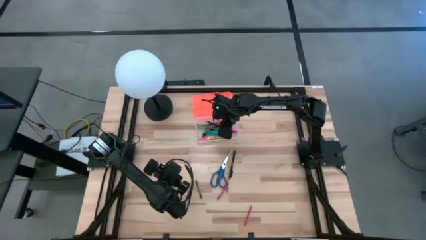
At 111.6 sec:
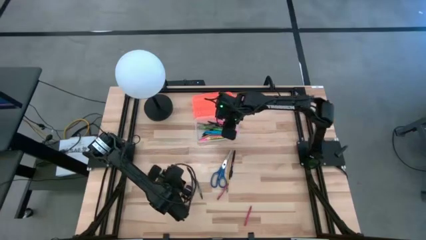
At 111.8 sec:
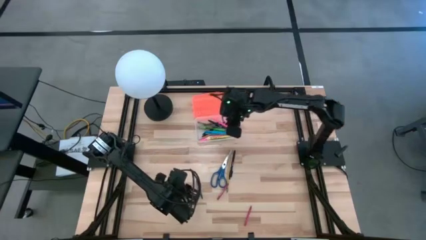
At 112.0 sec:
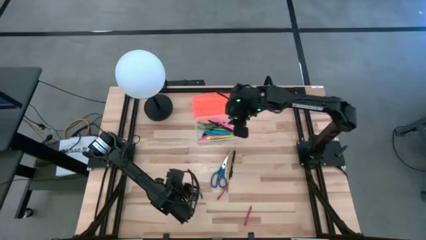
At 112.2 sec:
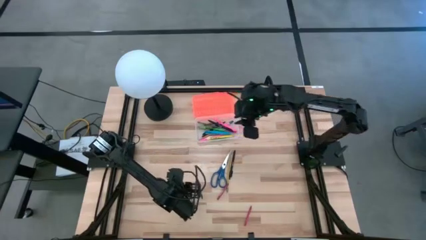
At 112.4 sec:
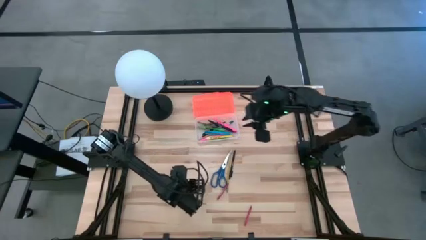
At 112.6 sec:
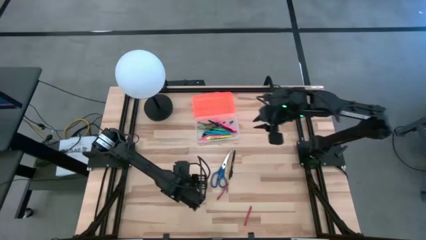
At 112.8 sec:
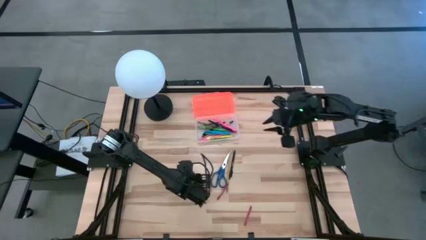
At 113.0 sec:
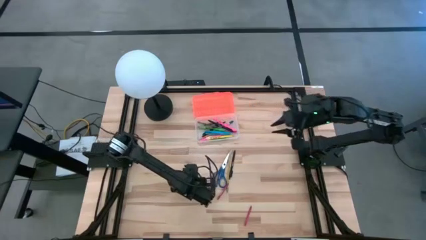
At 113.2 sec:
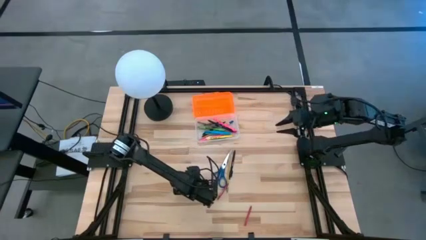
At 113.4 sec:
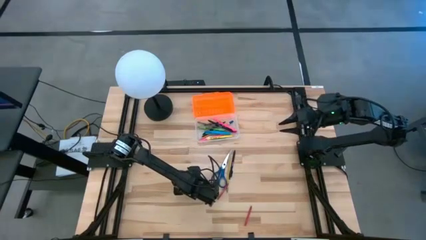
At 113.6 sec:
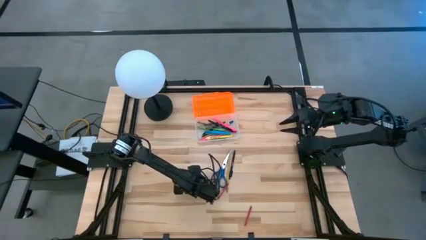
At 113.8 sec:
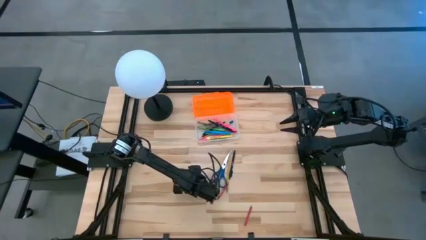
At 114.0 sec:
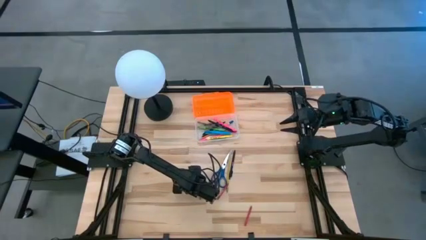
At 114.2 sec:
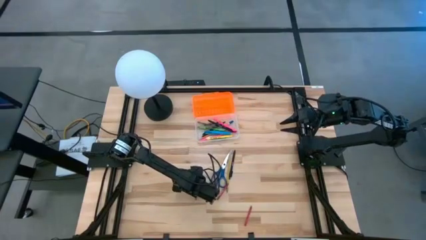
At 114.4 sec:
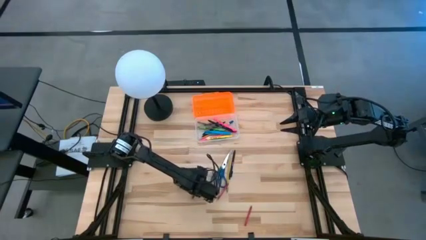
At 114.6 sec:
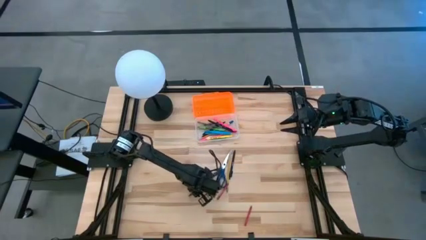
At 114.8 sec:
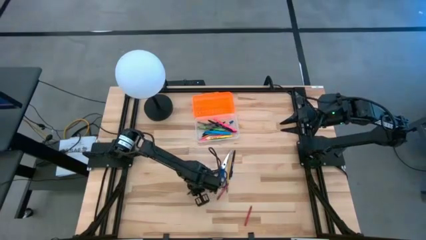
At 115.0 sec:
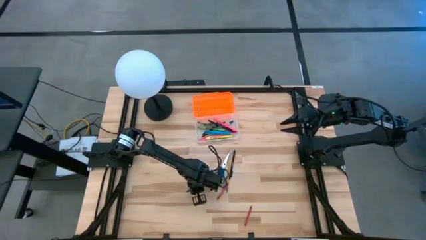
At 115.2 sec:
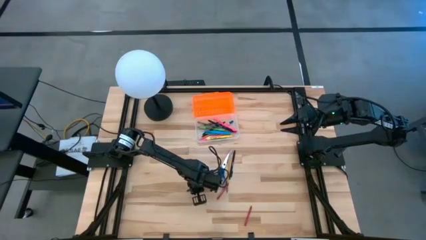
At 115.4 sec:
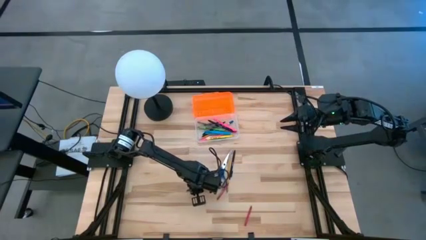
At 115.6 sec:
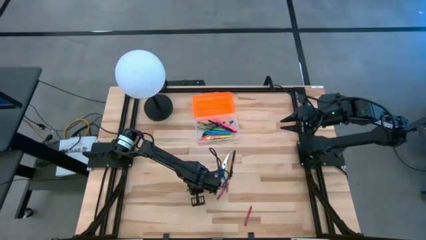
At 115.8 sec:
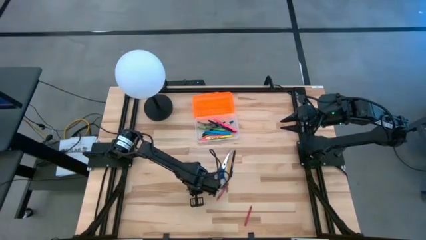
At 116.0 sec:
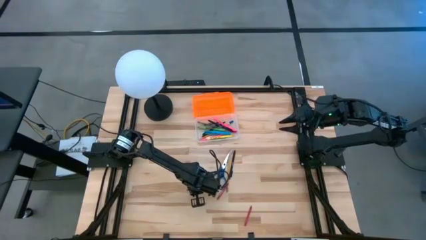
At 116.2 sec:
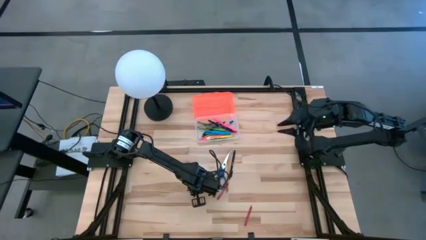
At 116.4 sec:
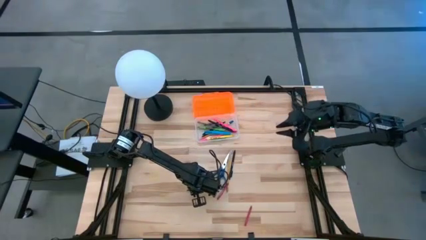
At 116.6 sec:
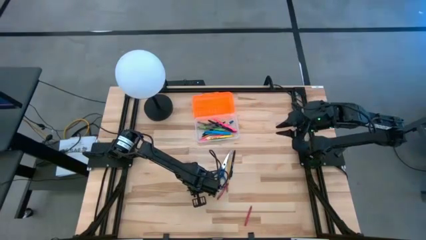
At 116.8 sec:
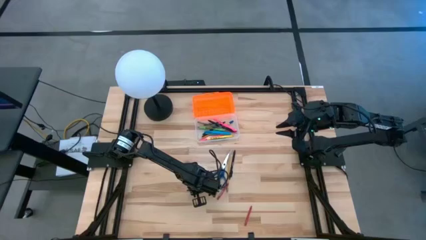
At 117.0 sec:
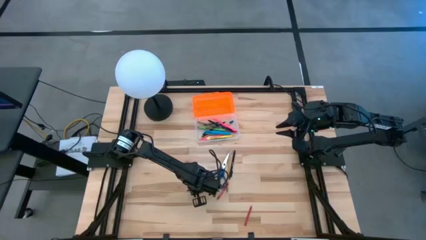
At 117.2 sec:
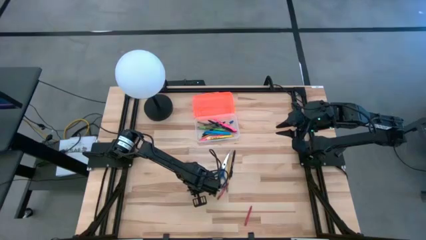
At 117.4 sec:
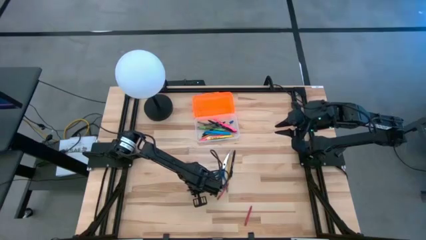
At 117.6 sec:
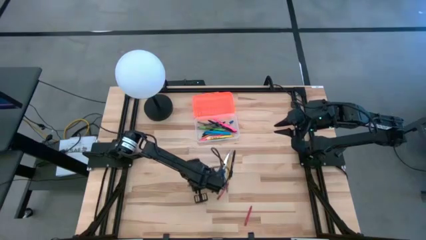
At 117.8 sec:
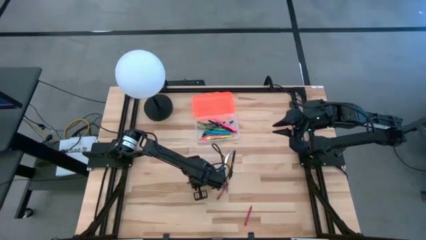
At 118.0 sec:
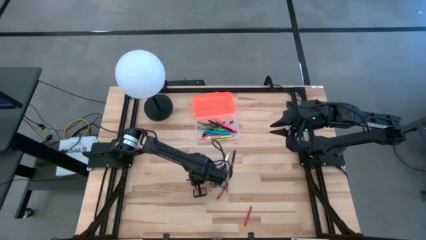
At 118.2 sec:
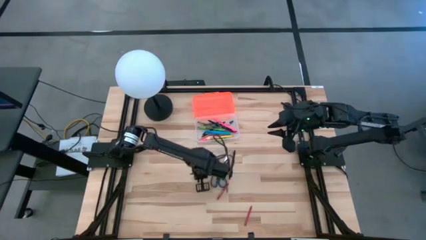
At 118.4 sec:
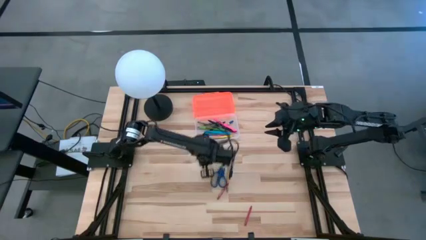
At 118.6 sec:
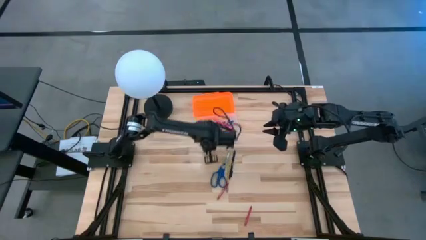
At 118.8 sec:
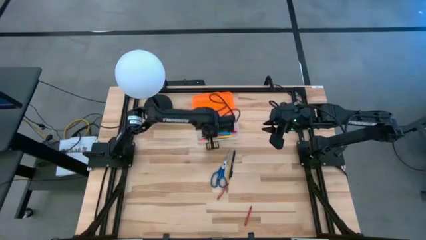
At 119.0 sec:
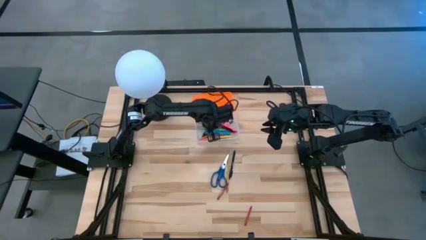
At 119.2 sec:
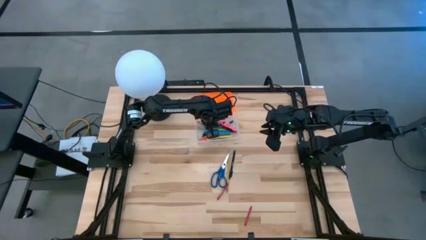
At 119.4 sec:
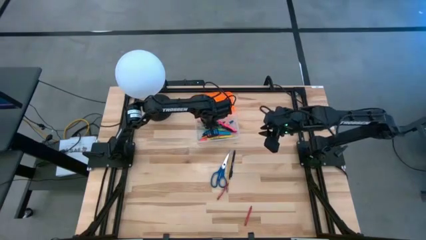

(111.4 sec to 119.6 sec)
Task: Pick & place school supplies into a supply box
Put the green crayon into the supply box

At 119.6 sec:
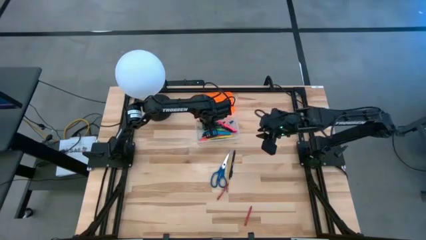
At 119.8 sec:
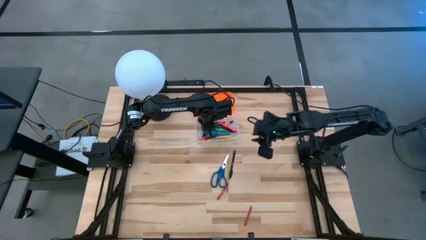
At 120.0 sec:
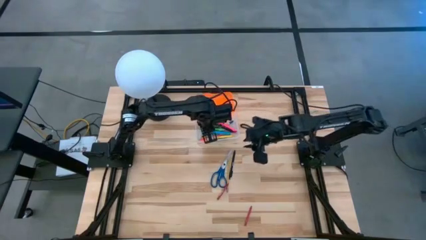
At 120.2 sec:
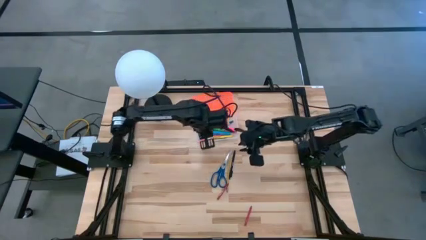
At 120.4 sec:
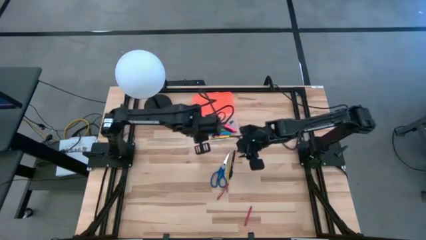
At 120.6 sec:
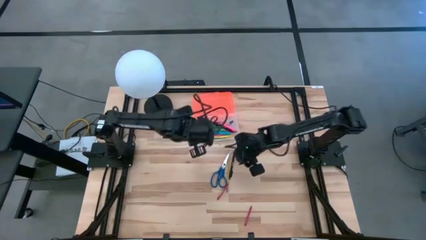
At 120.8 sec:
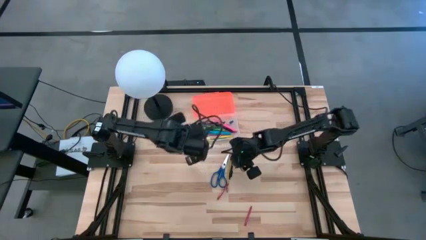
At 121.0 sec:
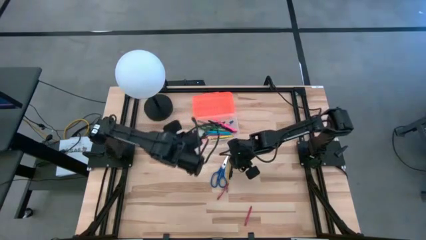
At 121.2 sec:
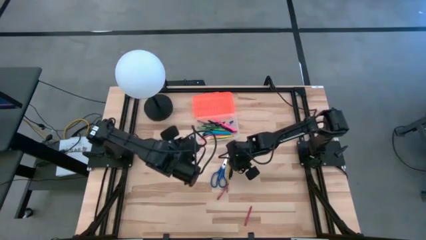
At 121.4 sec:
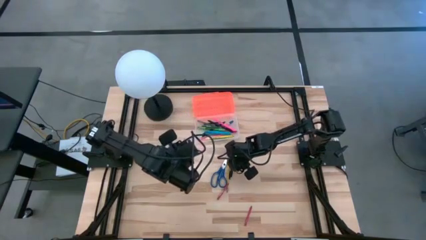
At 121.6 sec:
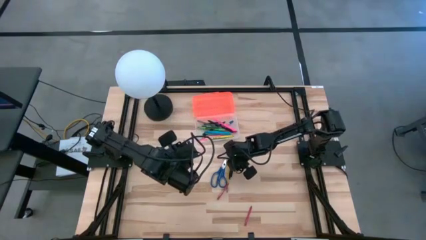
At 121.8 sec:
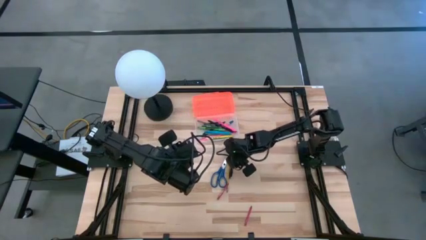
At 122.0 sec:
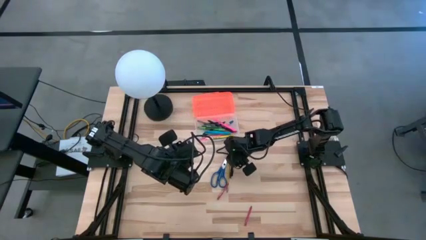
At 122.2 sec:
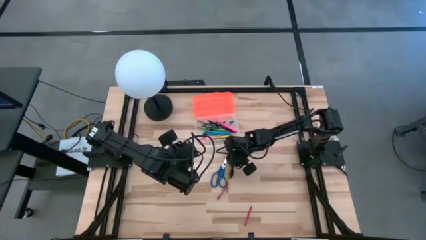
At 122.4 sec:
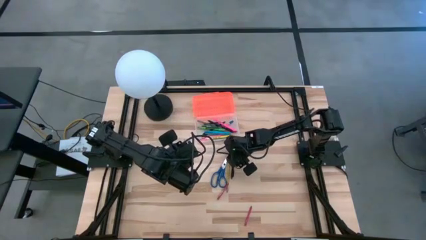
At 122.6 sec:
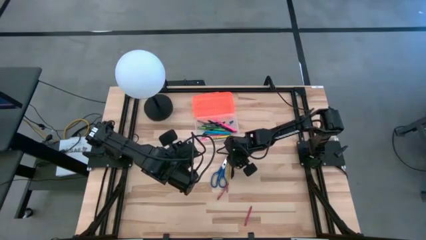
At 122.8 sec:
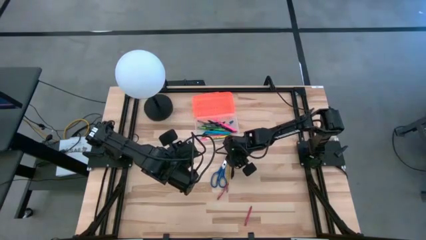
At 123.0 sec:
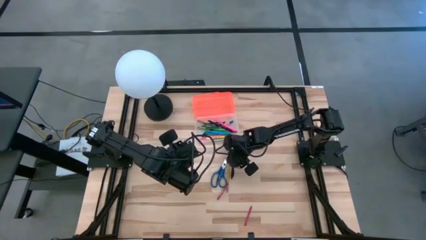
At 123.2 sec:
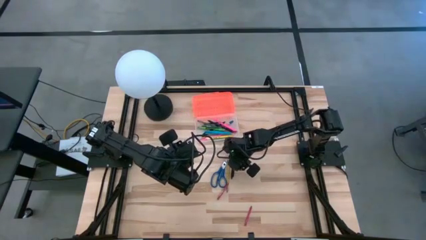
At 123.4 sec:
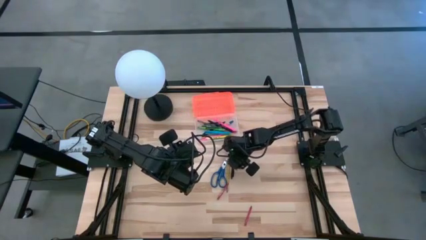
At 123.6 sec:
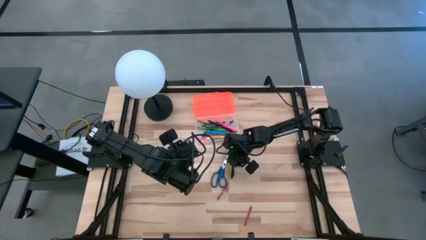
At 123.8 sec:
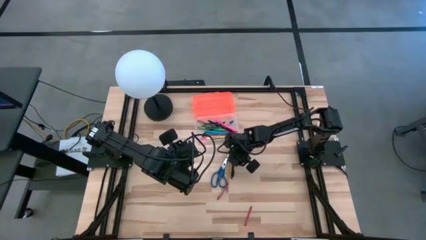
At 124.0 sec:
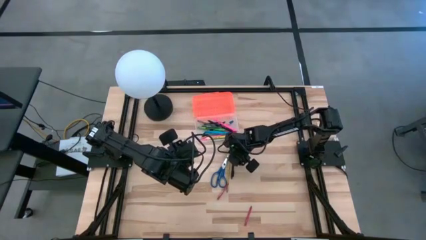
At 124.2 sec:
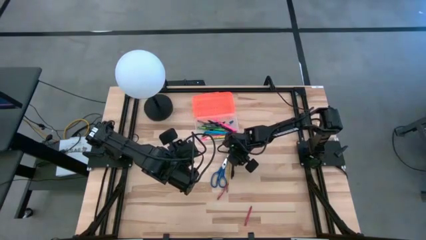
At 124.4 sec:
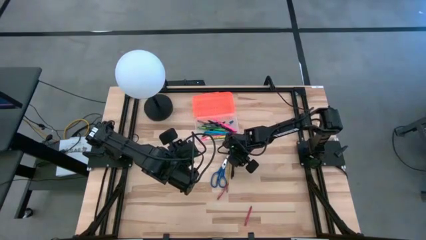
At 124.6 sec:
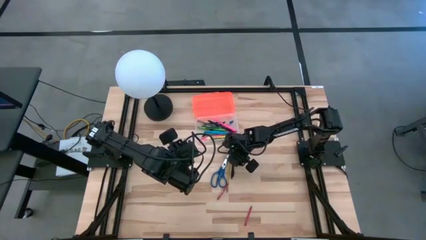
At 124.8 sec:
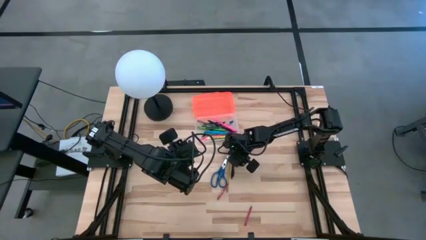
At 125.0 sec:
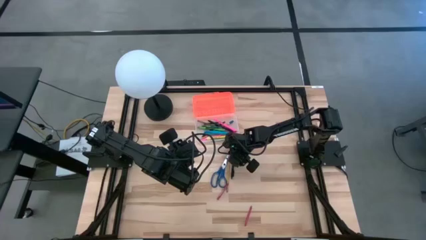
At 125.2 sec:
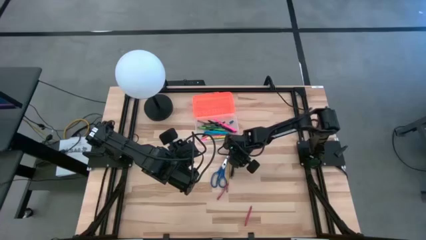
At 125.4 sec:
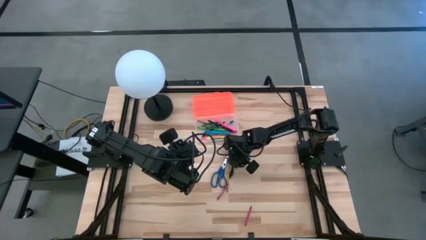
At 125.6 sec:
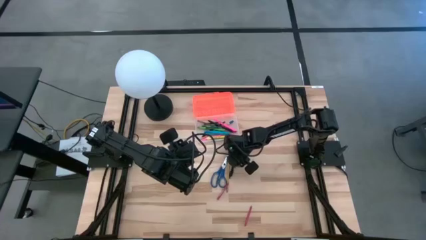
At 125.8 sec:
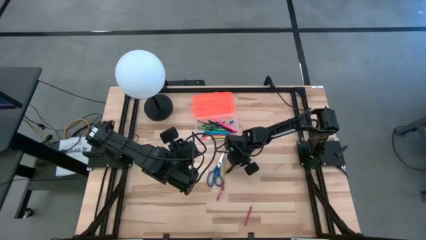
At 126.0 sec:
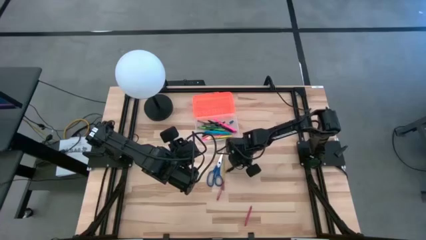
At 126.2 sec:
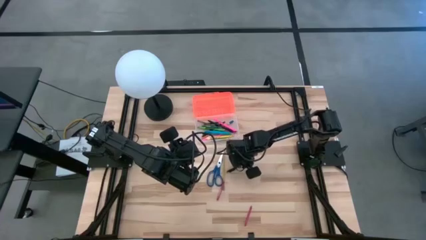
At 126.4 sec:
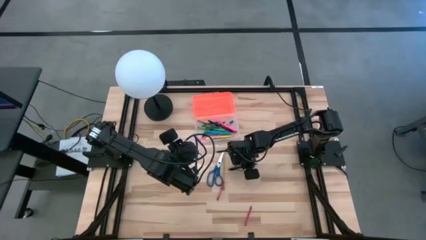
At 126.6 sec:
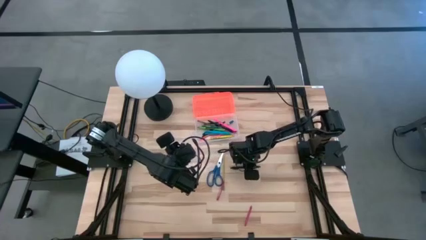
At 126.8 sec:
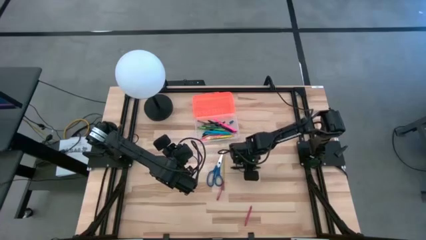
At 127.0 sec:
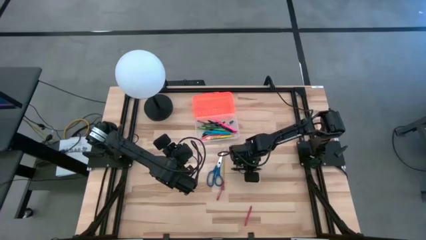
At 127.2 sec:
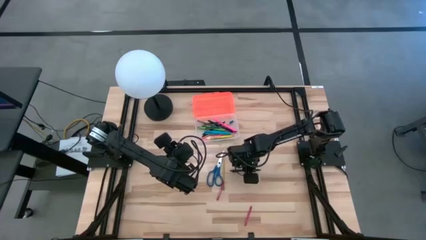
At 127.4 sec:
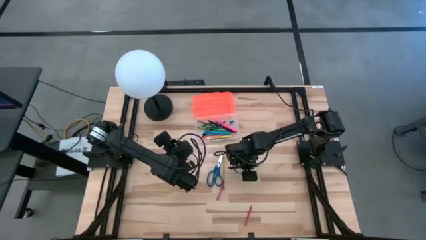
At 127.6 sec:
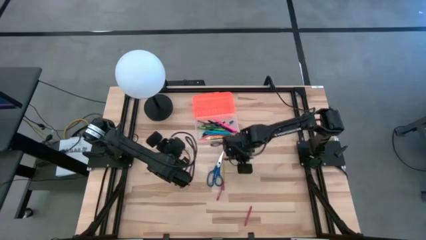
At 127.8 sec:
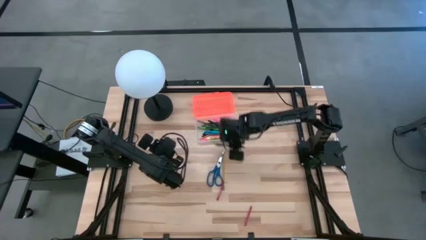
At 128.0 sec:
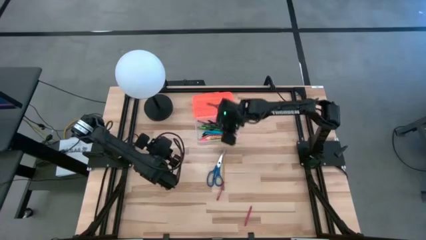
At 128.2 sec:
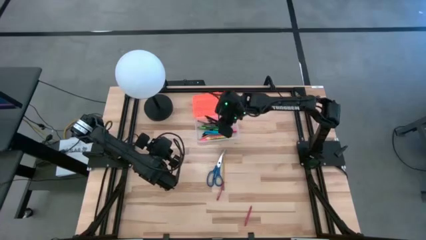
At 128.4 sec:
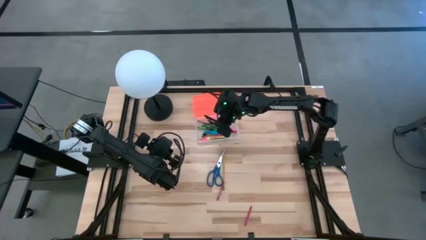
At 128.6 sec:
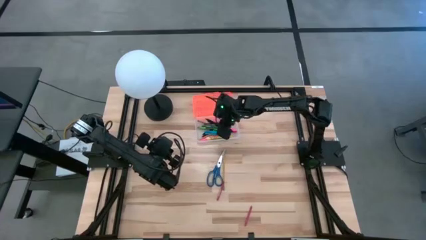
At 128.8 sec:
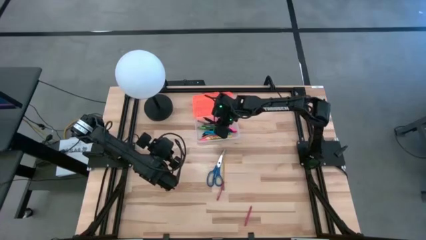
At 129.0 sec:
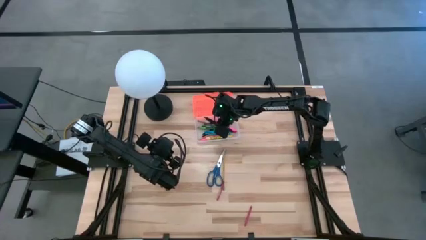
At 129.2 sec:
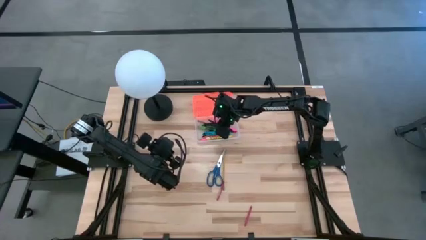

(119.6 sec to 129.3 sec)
Put the black pen into the supply box
